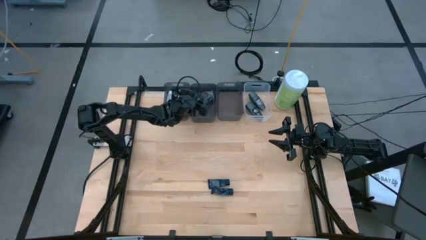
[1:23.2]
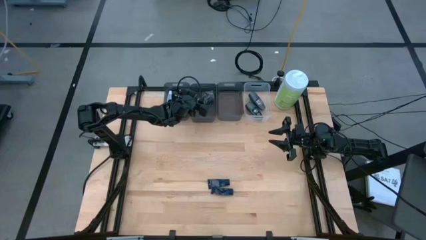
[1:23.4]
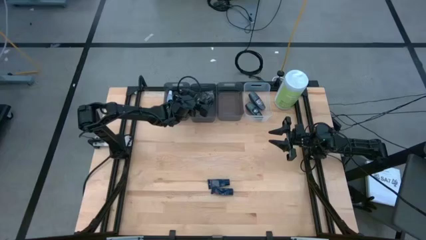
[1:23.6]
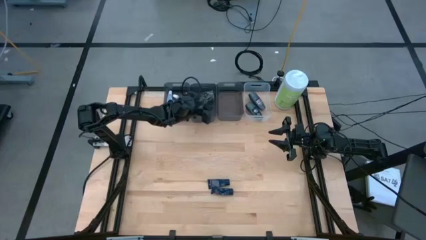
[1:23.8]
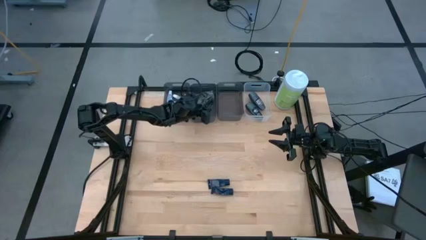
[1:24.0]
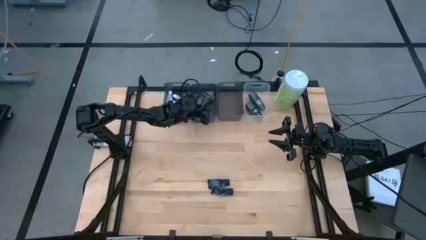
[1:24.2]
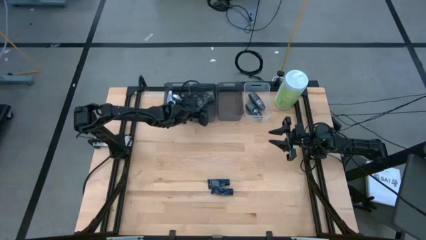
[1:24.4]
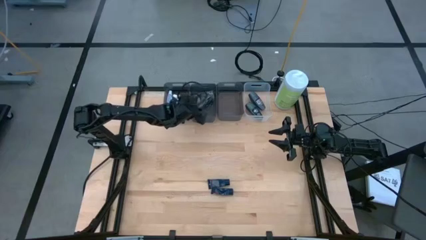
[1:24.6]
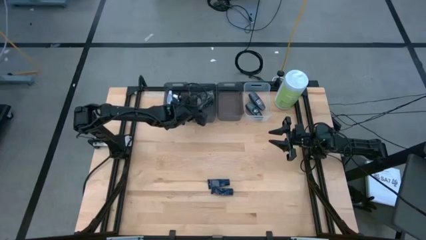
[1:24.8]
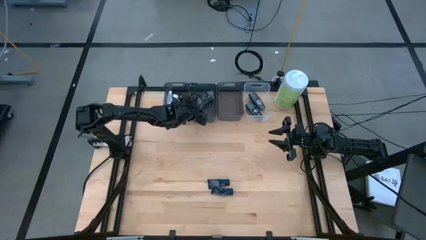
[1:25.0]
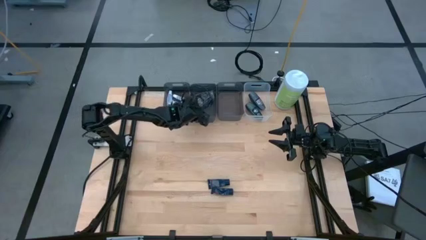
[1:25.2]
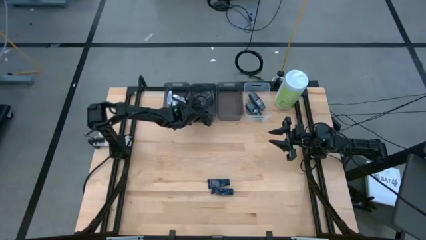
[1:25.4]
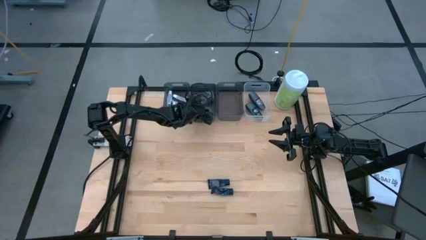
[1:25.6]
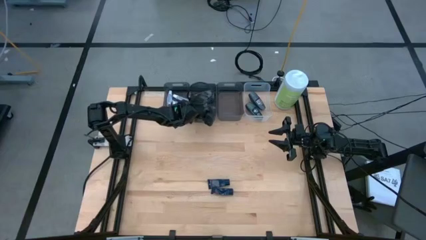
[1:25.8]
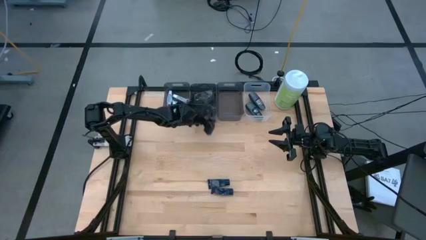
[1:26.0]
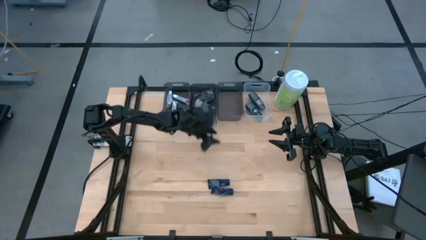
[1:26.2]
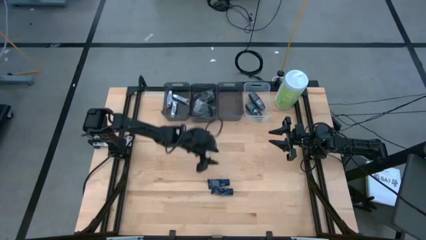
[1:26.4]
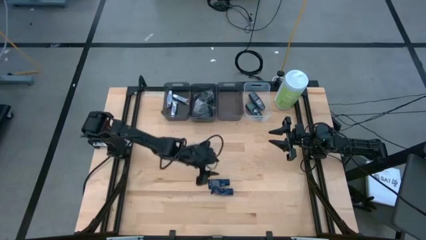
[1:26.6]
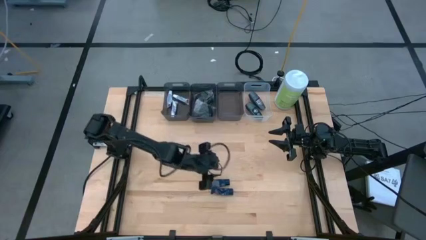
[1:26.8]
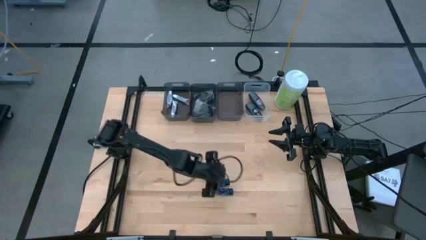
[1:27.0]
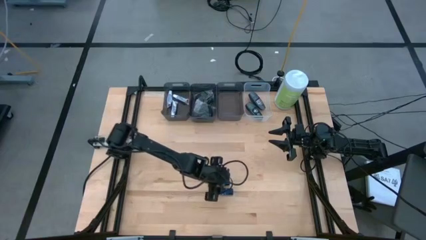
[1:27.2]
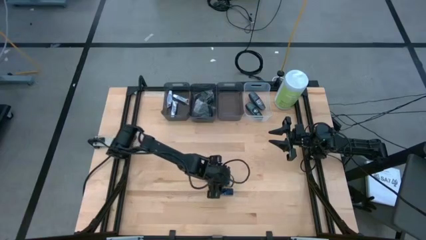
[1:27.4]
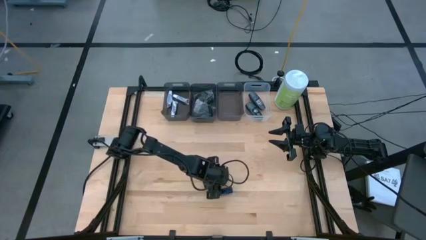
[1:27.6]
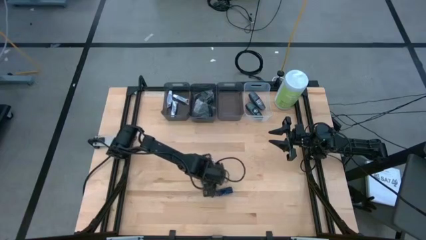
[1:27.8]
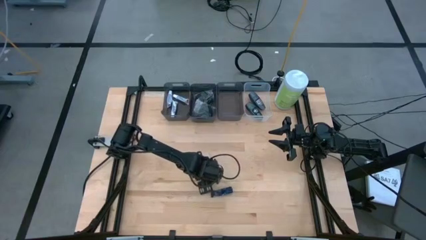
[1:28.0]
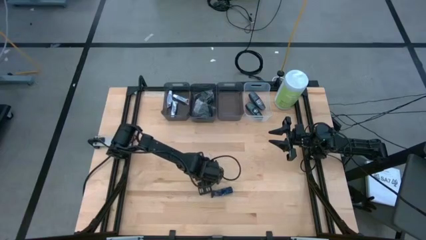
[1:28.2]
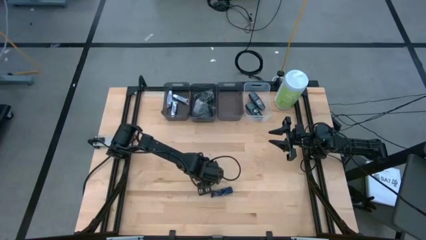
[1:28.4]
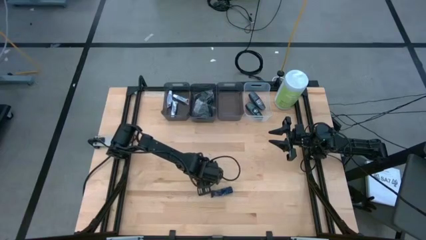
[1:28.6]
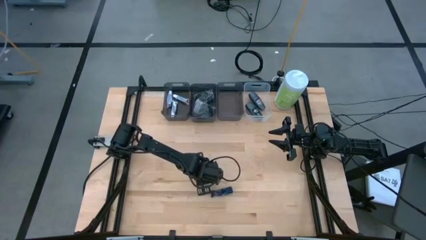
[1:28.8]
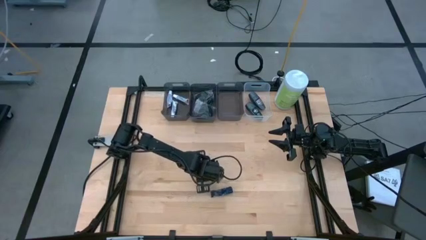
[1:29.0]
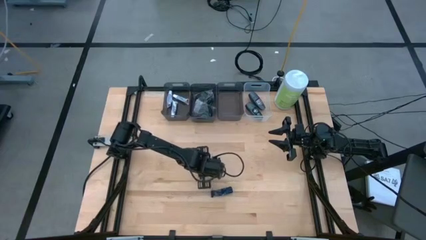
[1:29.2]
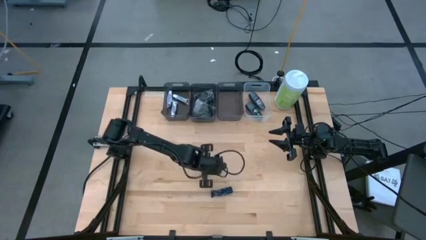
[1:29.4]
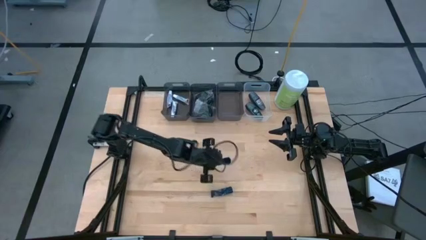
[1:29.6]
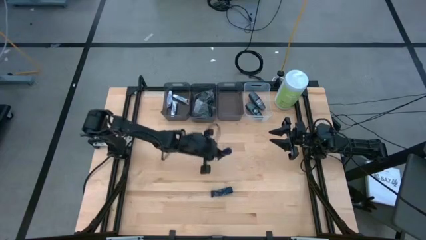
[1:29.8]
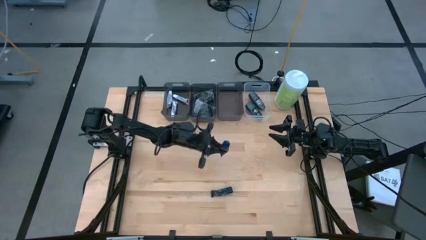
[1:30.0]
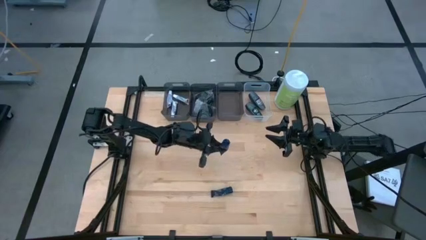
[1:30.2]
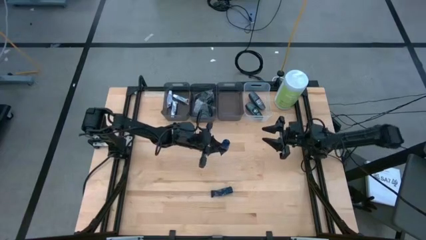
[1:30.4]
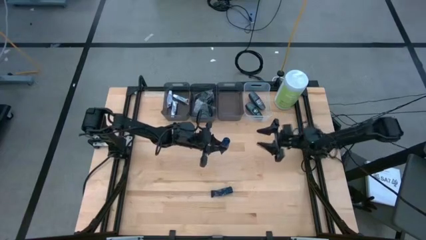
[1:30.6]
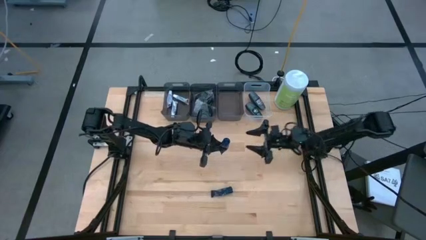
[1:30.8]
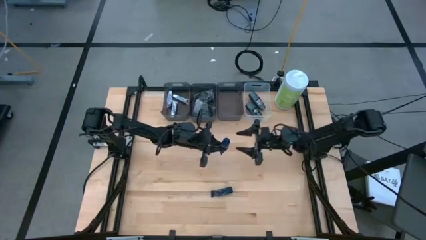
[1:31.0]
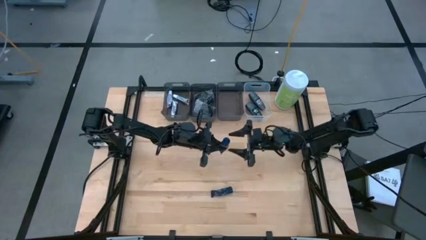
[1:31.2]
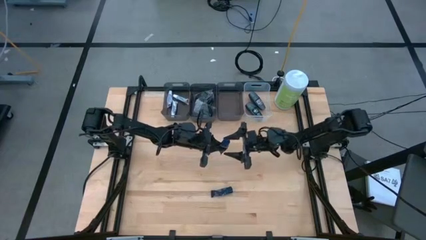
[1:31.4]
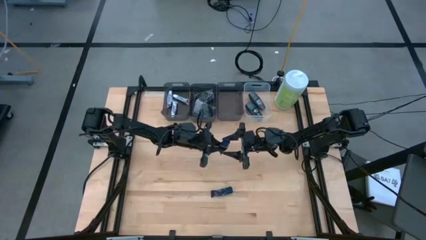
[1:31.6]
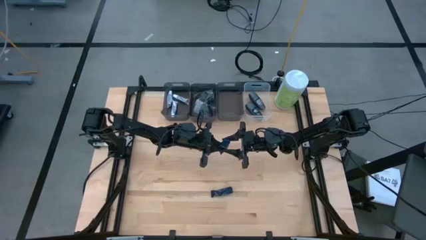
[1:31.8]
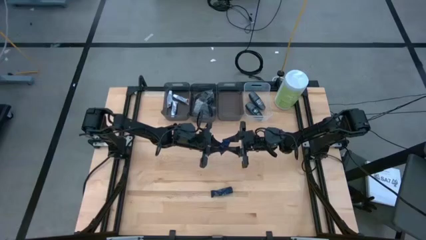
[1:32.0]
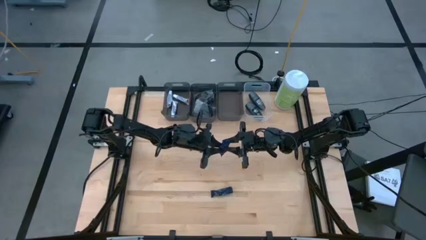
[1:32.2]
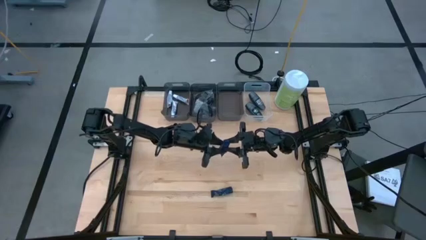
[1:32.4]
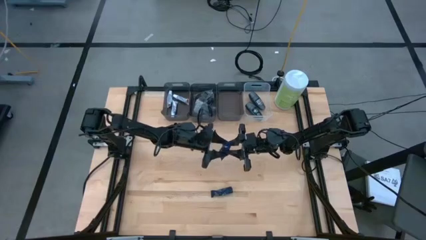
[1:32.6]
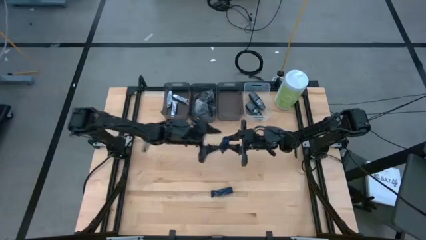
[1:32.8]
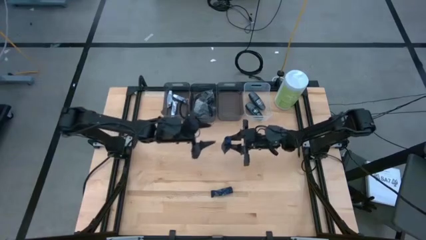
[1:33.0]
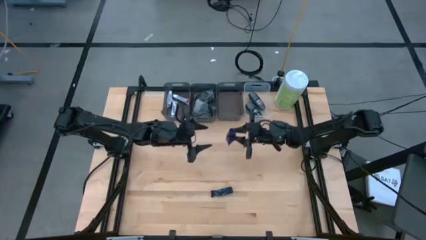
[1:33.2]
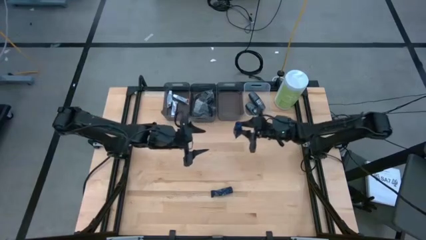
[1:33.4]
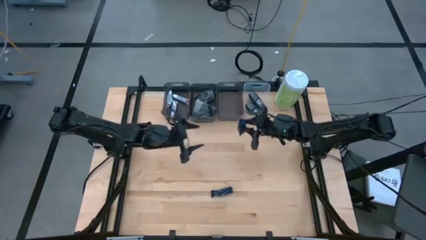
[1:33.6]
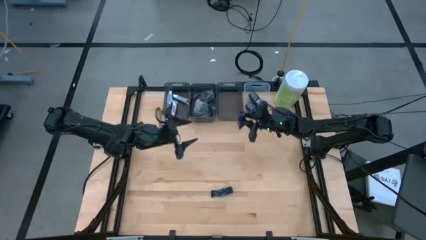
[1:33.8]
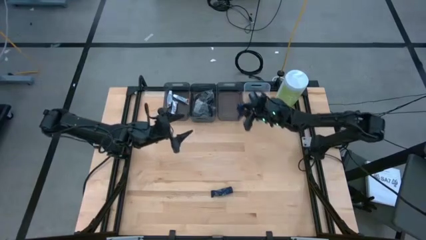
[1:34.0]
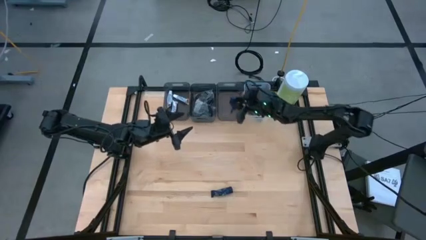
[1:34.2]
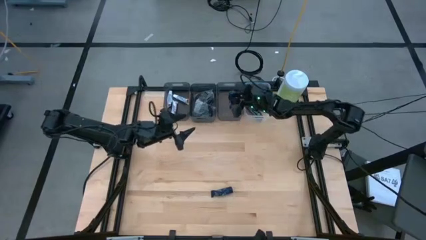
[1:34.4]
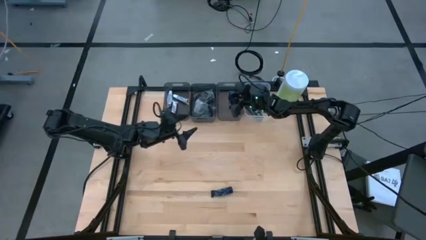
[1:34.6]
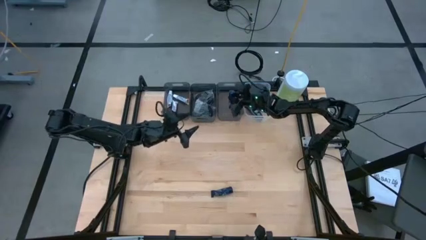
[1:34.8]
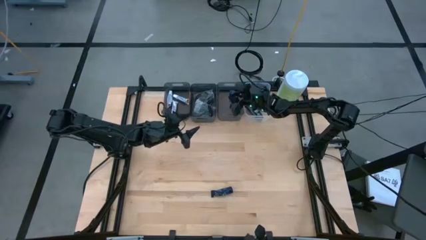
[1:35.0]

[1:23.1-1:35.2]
Task: Pick & Place Travel size toiletries
Put the top shave cream into the right black bin

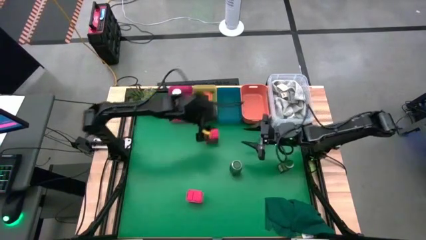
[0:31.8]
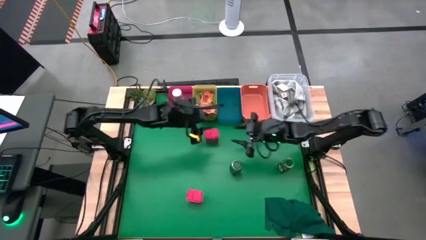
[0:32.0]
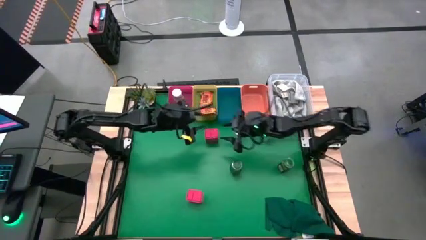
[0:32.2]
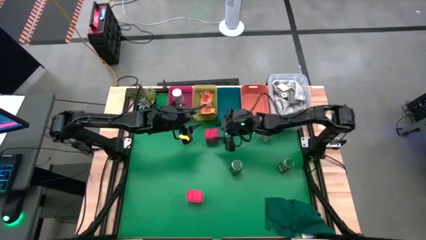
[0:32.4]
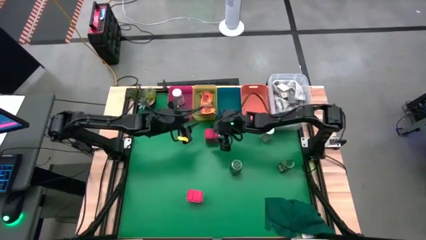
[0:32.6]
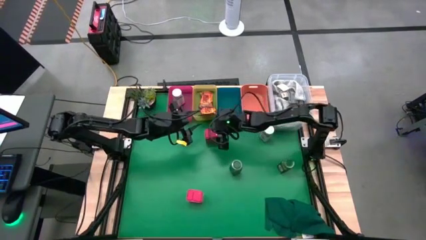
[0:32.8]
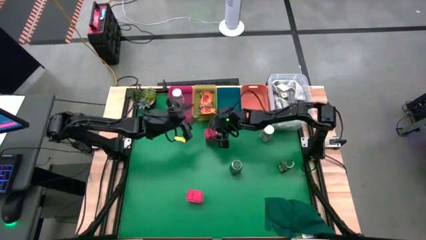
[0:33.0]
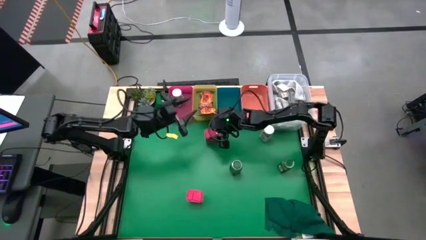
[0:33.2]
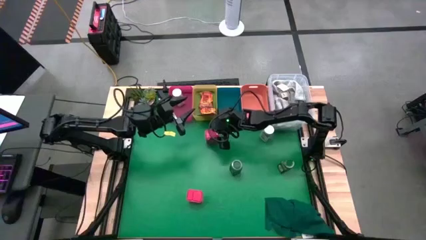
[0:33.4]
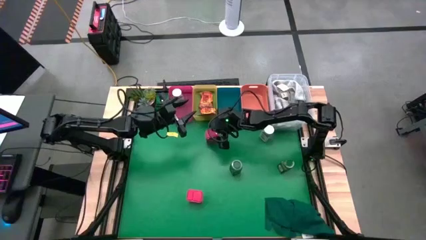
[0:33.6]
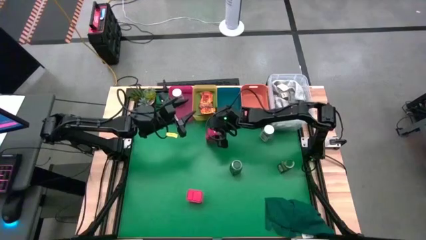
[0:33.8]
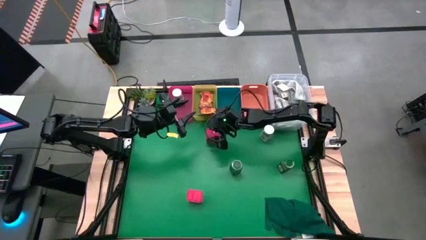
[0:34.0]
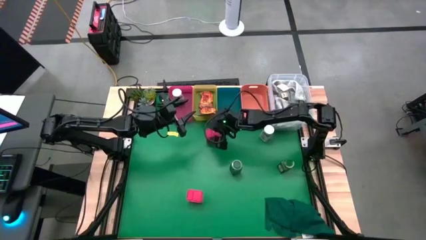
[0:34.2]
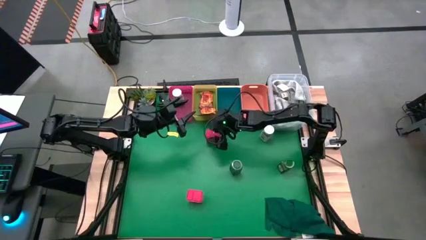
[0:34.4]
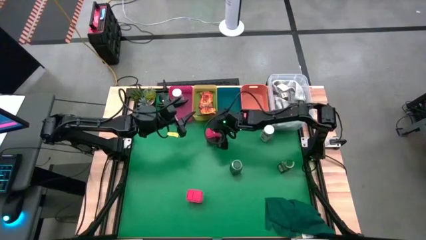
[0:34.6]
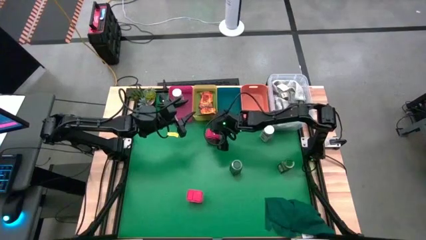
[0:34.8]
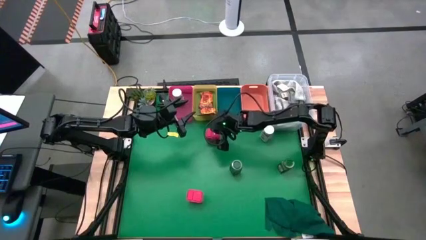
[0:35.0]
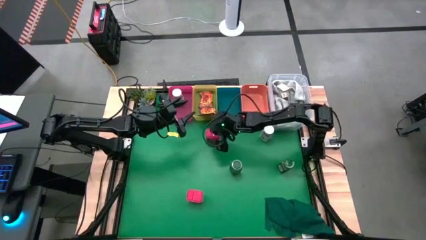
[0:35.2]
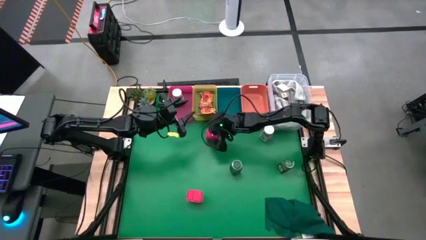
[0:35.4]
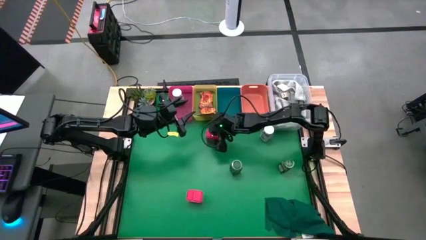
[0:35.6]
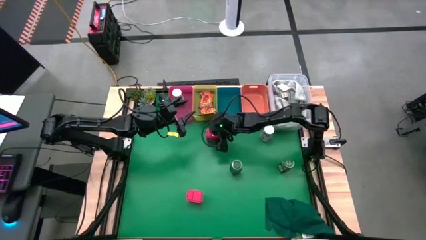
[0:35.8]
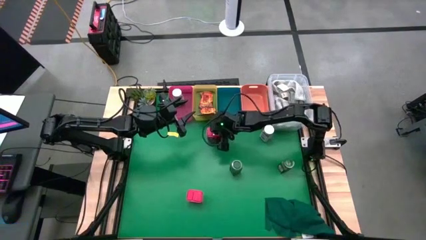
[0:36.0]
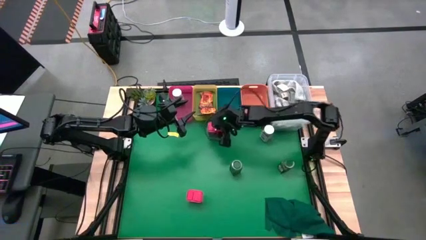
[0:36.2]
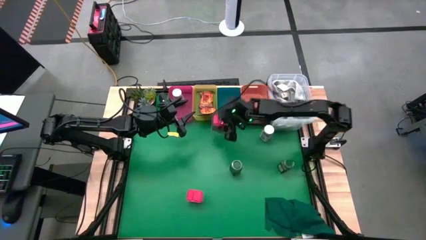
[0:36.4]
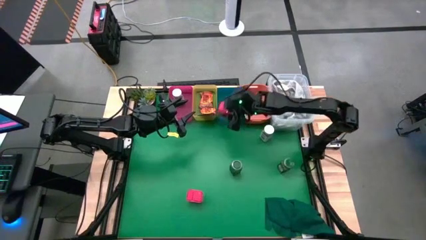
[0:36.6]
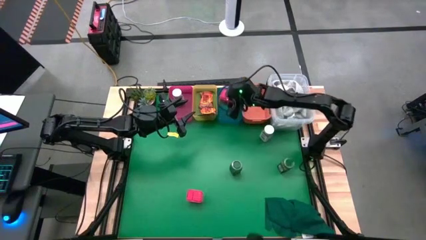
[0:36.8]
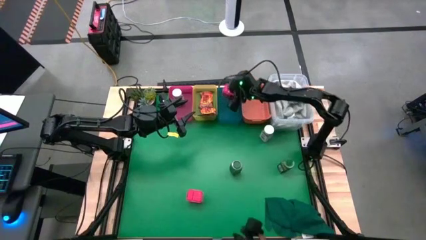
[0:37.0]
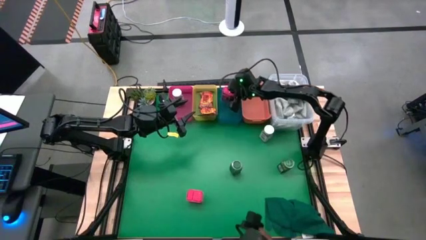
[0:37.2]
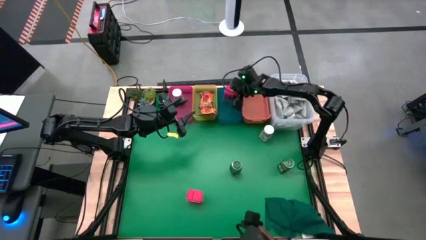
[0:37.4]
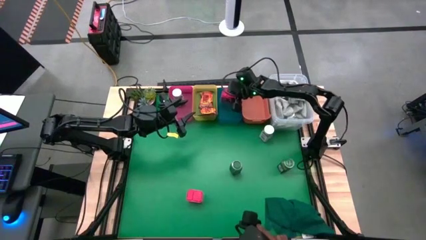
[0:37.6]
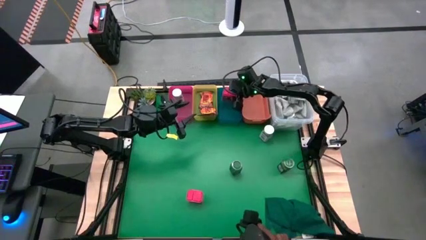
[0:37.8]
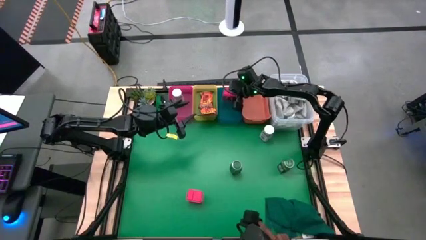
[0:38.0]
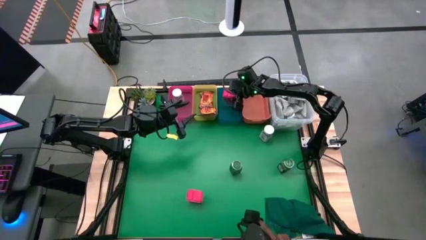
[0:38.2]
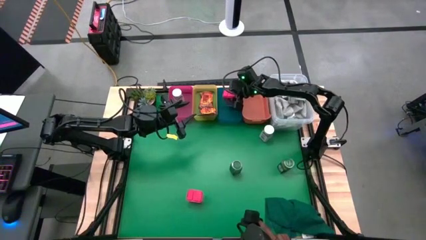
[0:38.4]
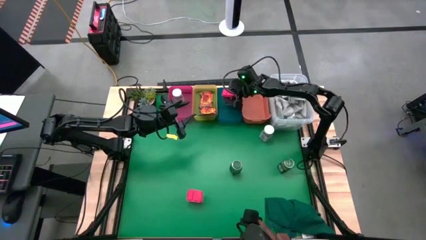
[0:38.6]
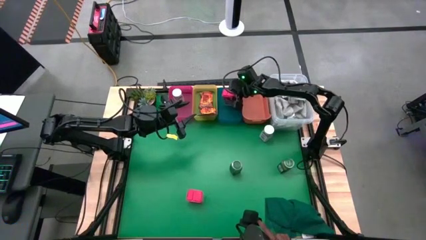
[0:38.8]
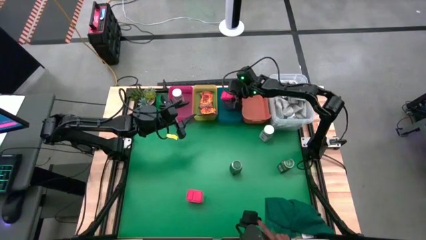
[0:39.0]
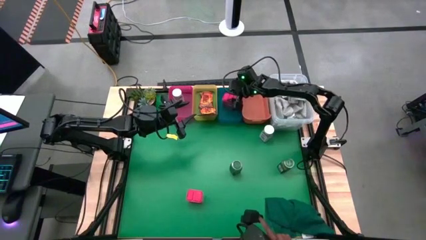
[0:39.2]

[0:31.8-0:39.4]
Task: Sort spices by type
Put the top center red seasoning can into the blue bin
